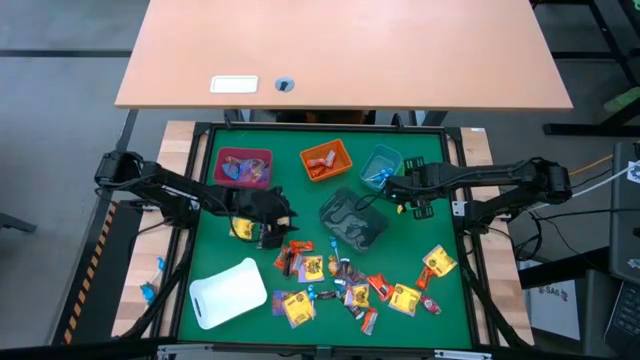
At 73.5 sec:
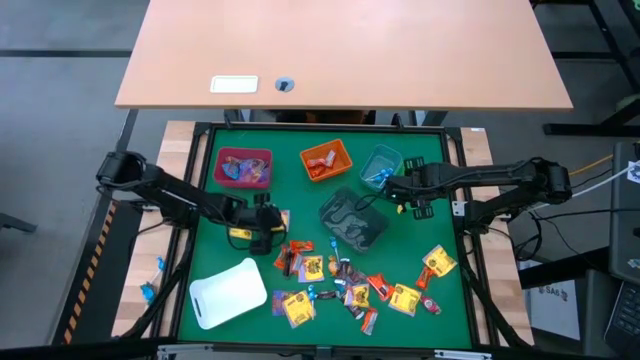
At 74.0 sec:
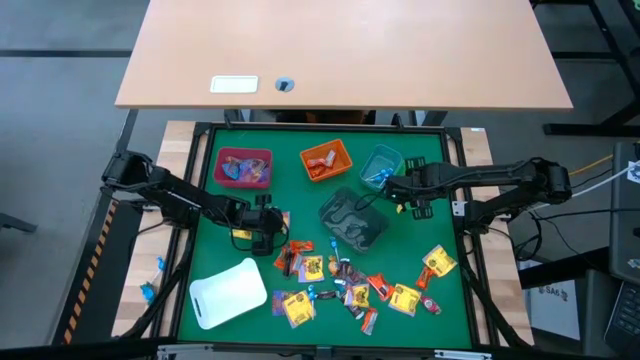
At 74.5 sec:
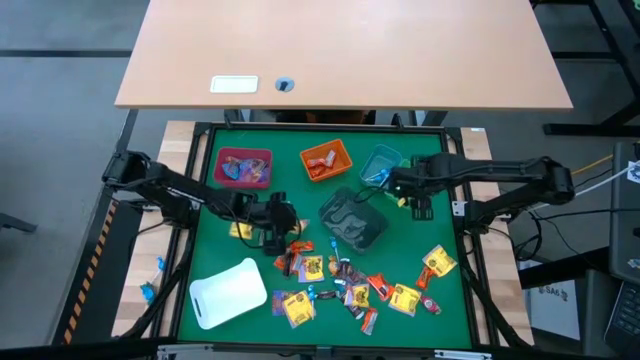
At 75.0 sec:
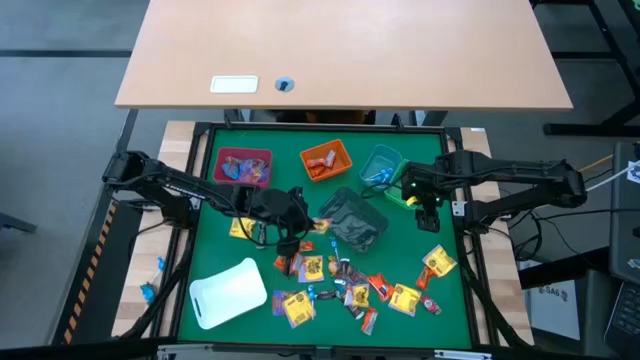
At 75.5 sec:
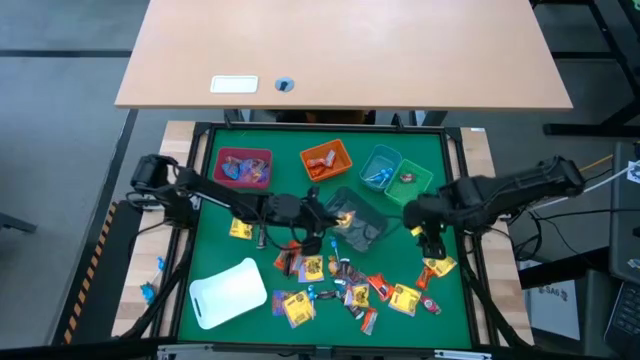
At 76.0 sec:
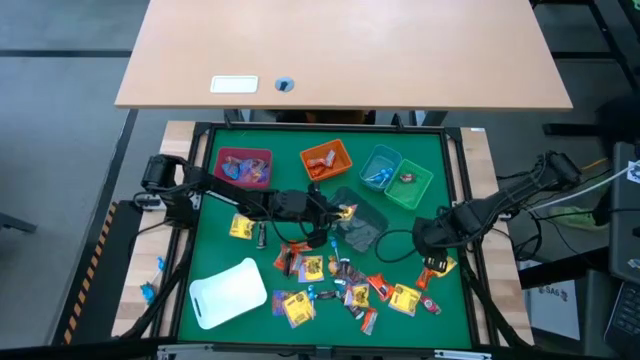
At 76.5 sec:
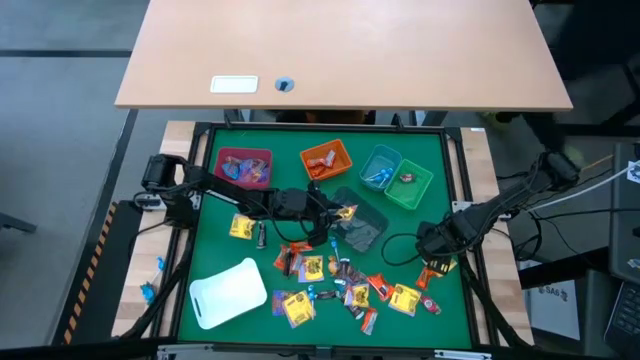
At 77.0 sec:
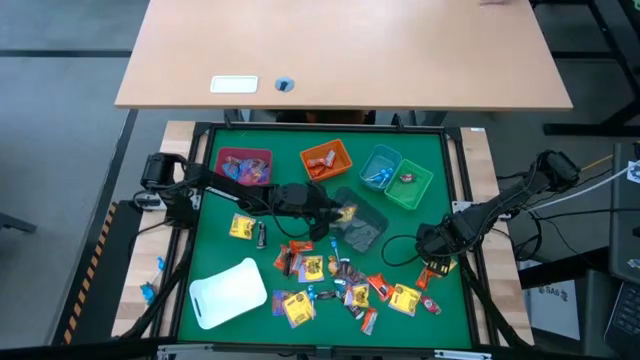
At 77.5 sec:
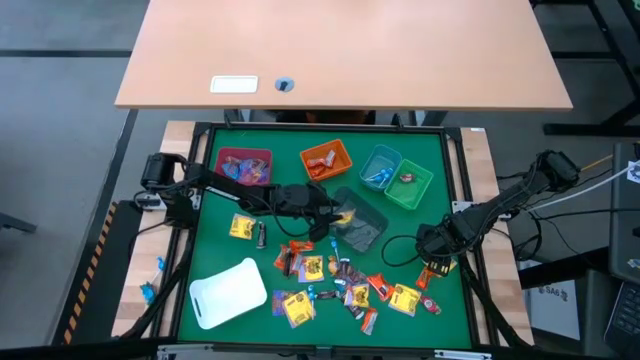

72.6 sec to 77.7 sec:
Task: Sort candy
Put the yellow candy pack into the black bin

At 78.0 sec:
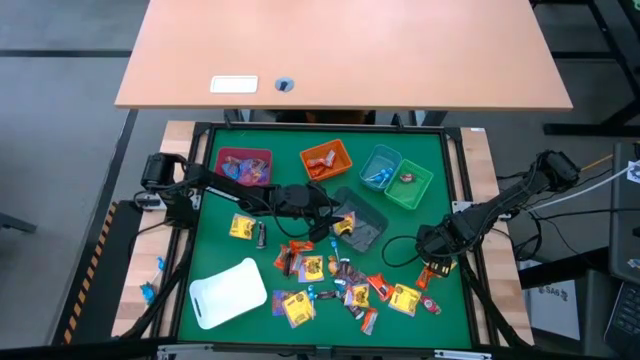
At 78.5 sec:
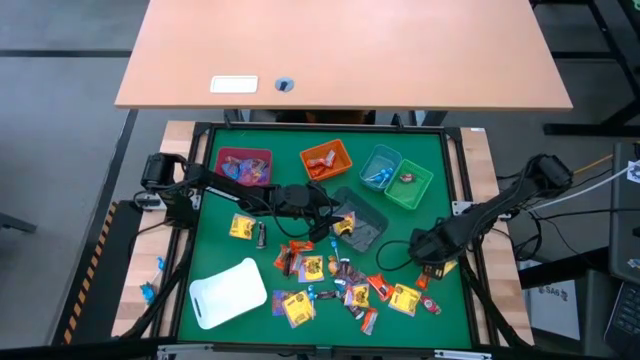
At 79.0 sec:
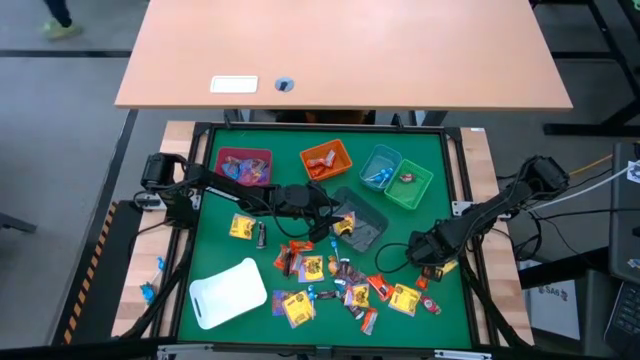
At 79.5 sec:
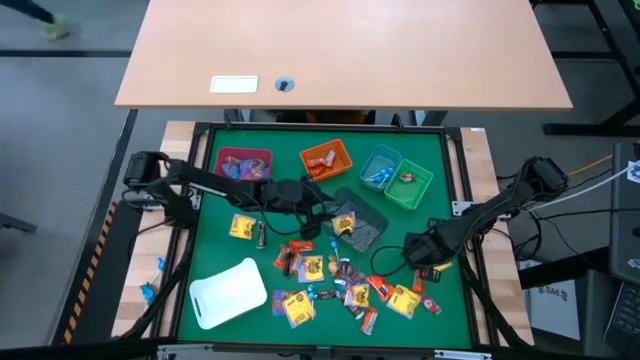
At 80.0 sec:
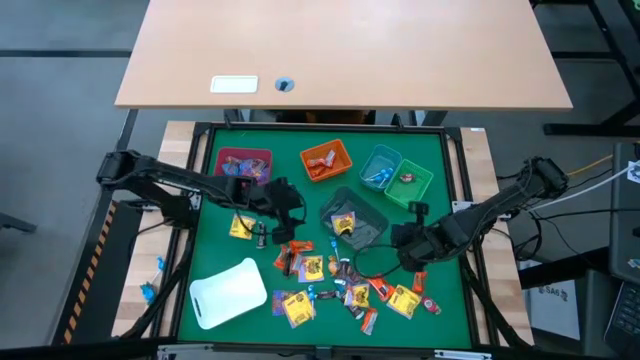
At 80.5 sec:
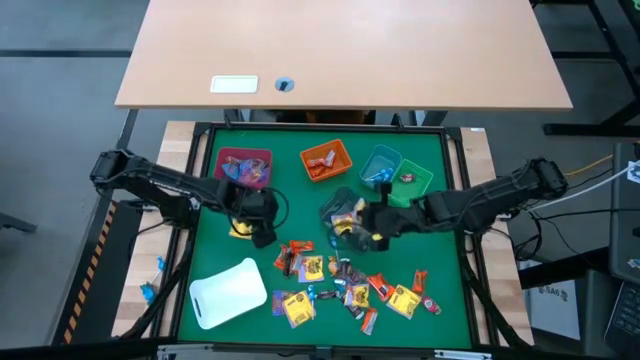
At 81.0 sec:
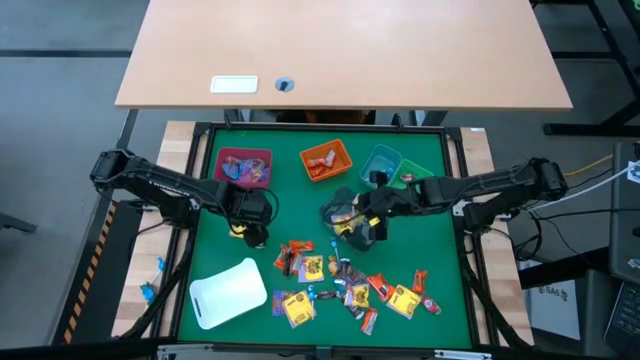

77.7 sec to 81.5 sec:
Put the yellow candy pack into the black bin

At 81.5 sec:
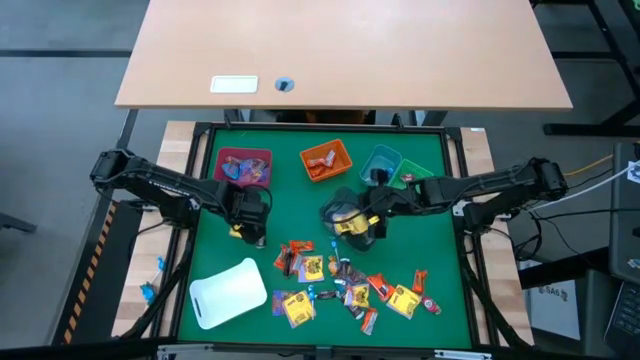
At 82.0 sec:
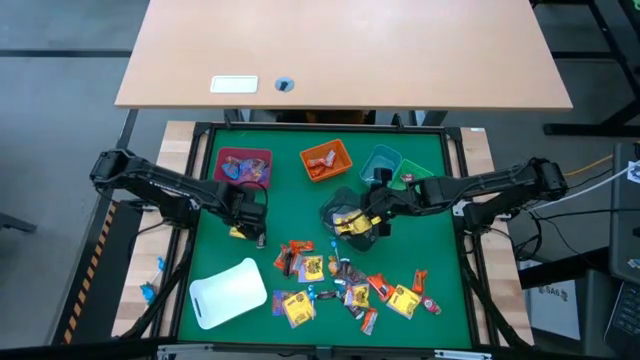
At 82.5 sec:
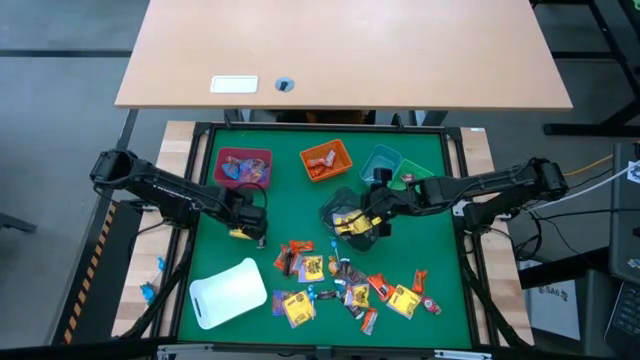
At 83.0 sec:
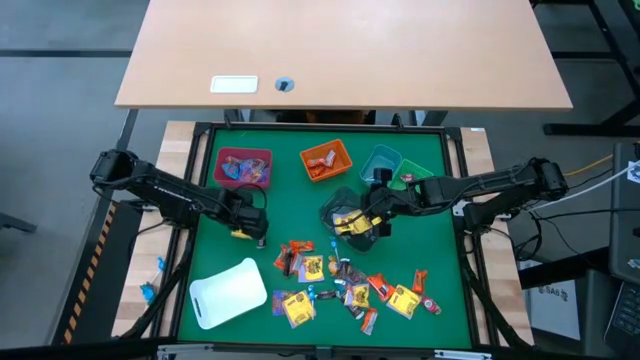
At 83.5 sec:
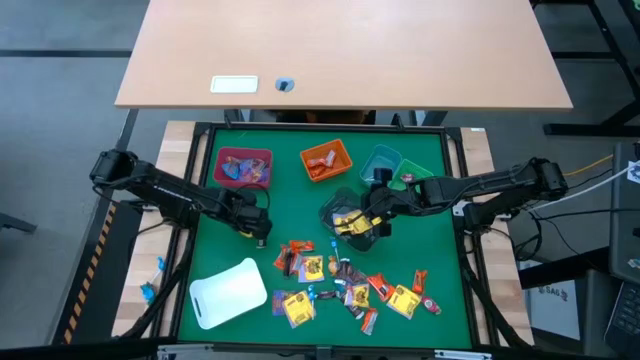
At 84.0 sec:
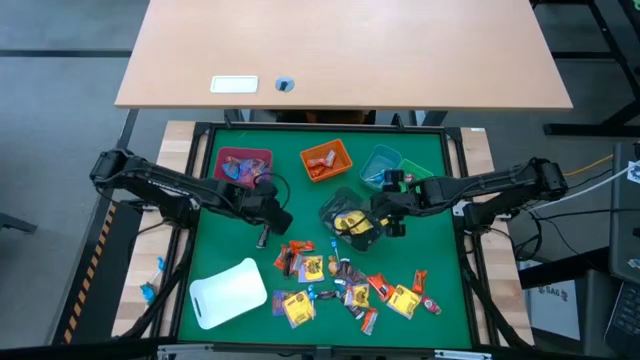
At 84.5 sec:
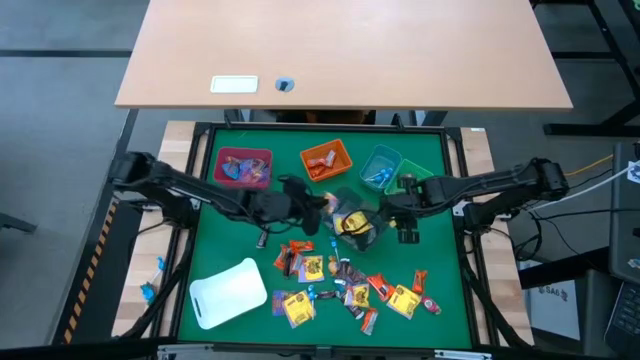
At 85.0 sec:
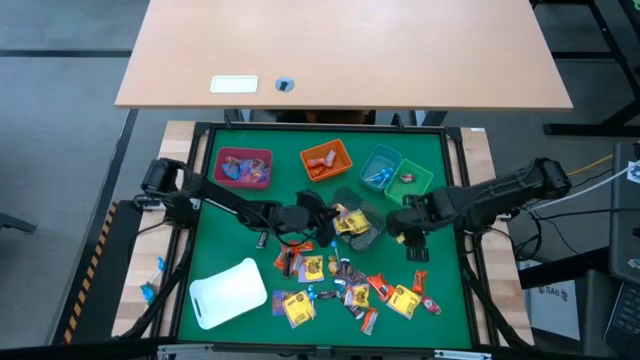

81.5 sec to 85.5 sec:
Put the yellow candy pack into the black bin

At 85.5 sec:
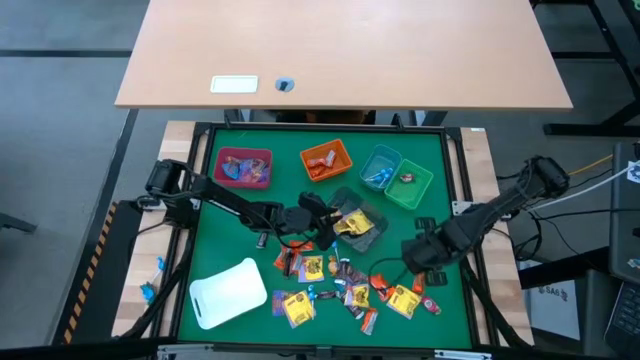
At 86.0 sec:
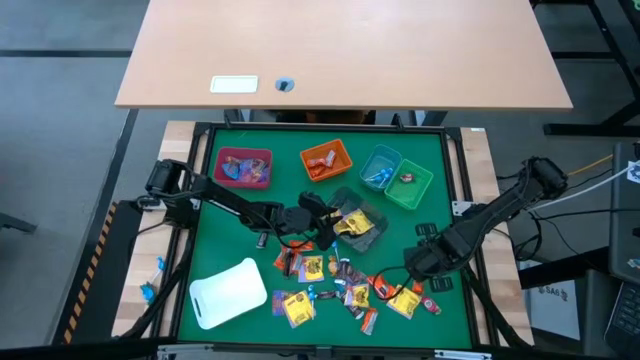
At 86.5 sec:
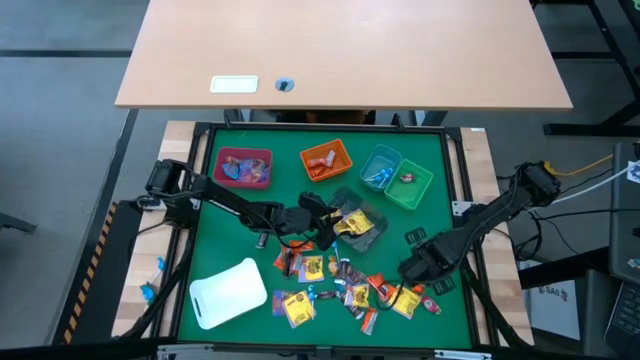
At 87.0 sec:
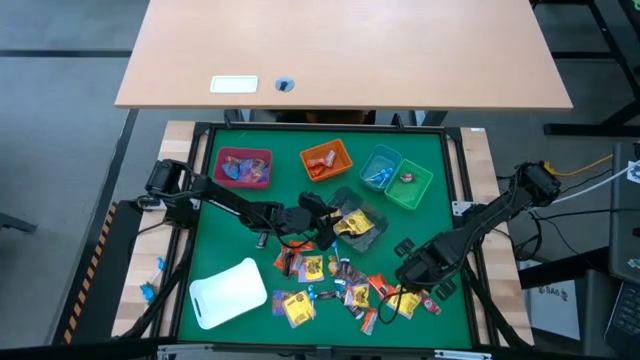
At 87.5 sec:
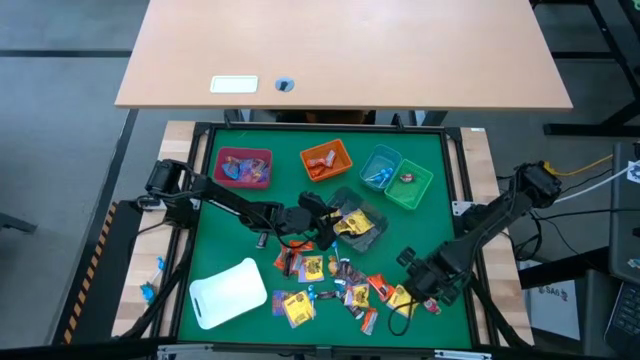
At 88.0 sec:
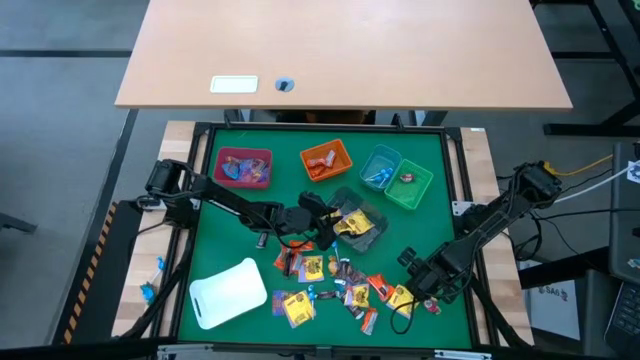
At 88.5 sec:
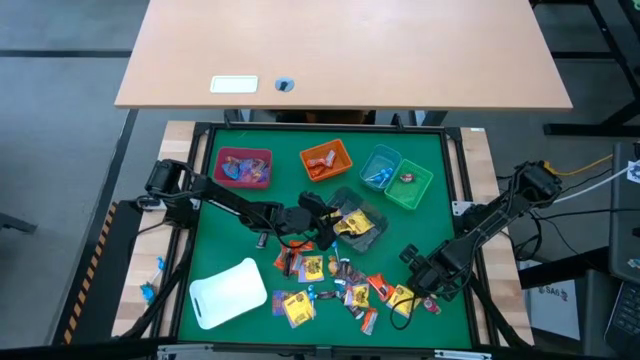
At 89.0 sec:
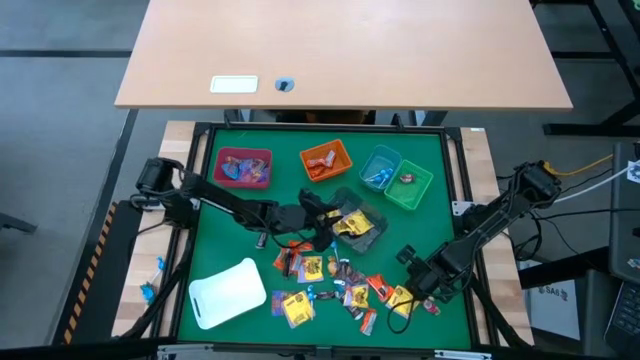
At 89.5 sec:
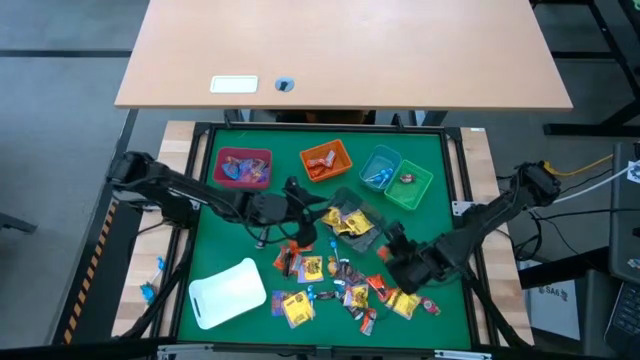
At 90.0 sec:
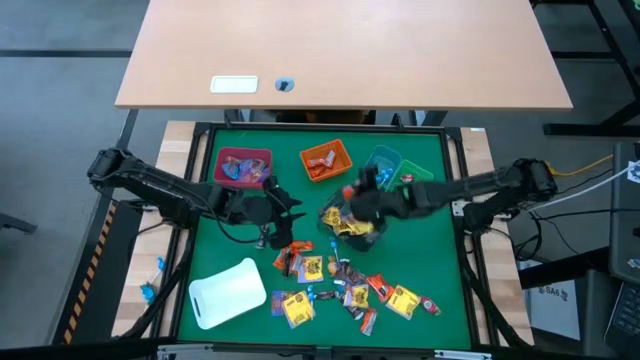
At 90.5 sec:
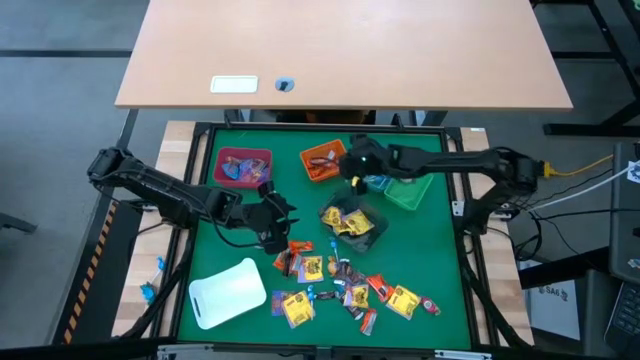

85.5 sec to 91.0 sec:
Put the orange chocolate into the orange bin

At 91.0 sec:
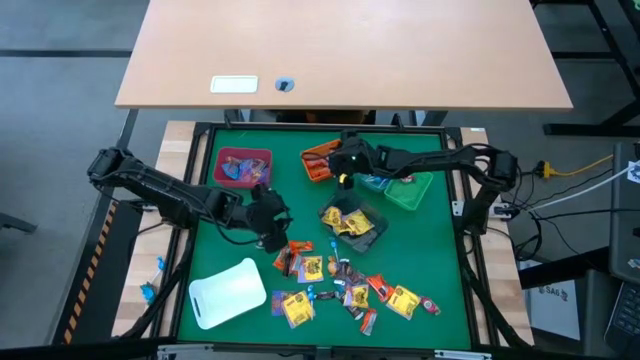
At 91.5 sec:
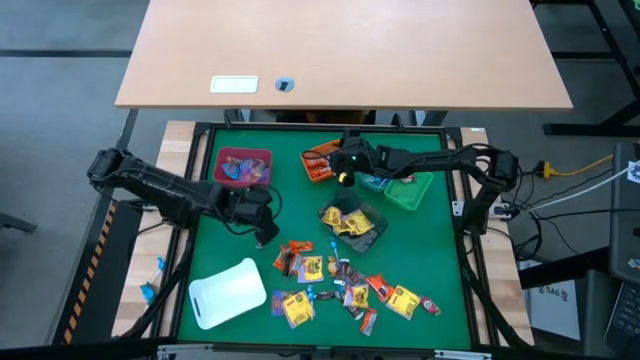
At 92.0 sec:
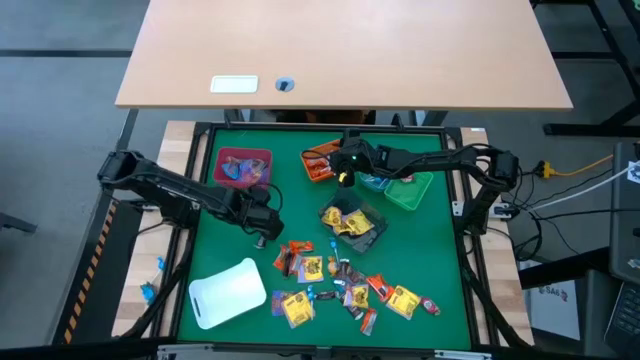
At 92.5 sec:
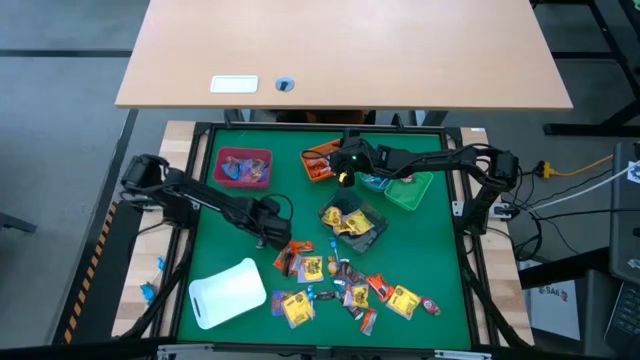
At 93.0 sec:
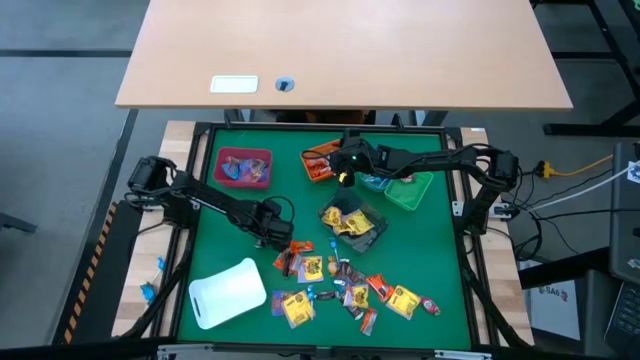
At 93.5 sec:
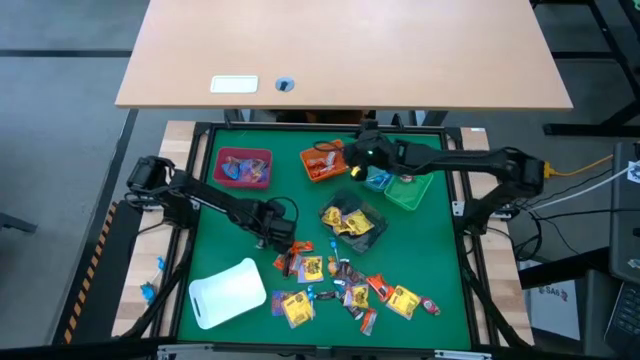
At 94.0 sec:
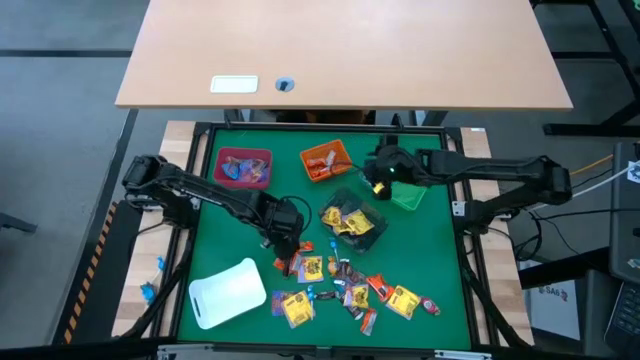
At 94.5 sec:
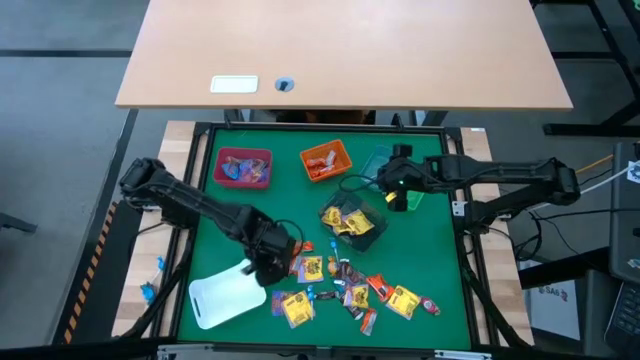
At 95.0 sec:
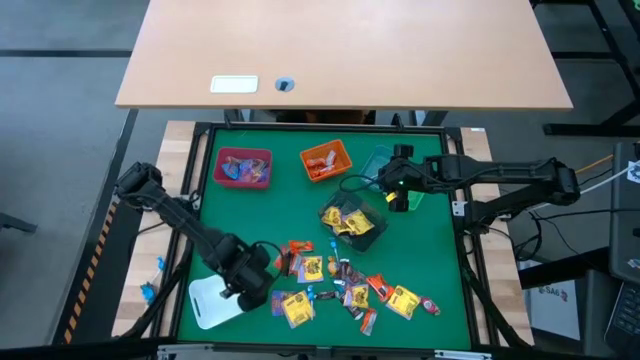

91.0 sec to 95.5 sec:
Put the brown chocolate into the white bin
